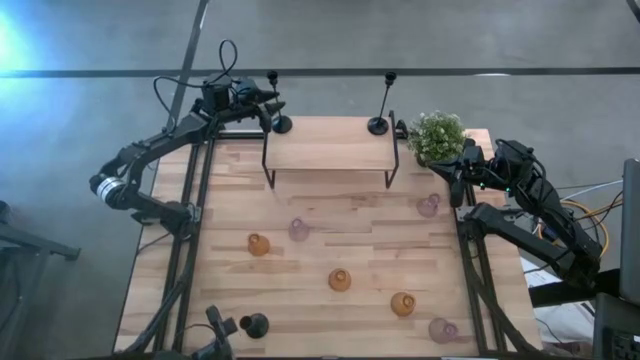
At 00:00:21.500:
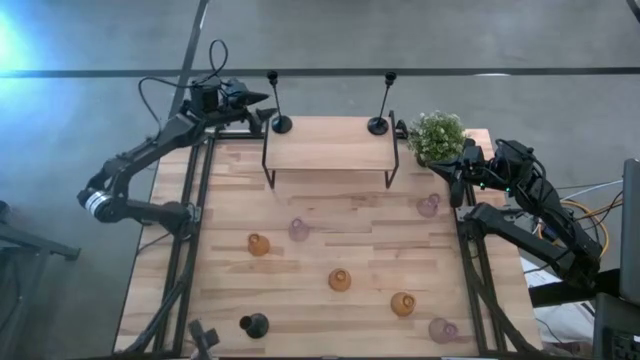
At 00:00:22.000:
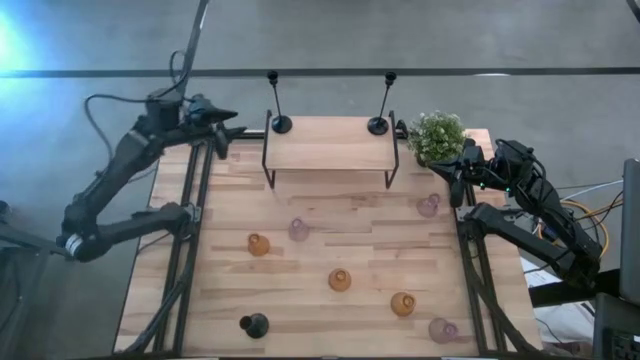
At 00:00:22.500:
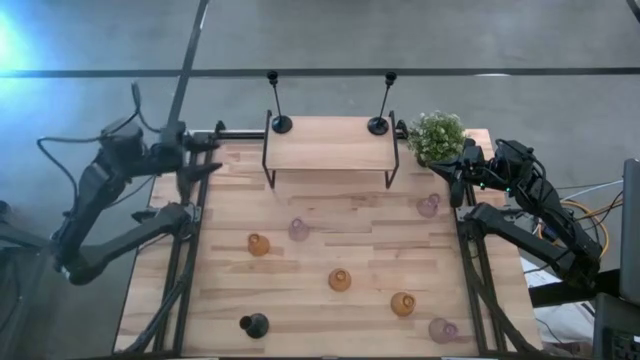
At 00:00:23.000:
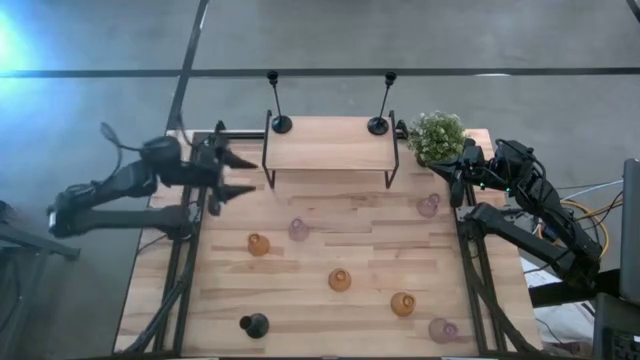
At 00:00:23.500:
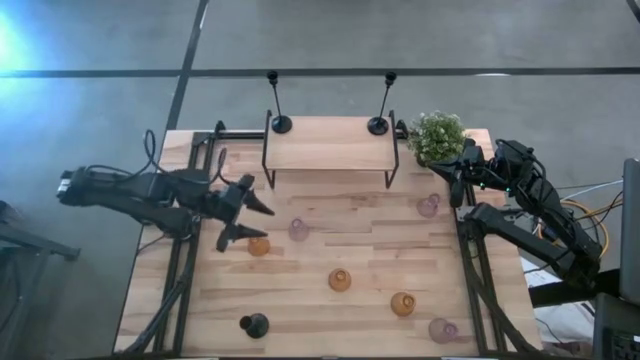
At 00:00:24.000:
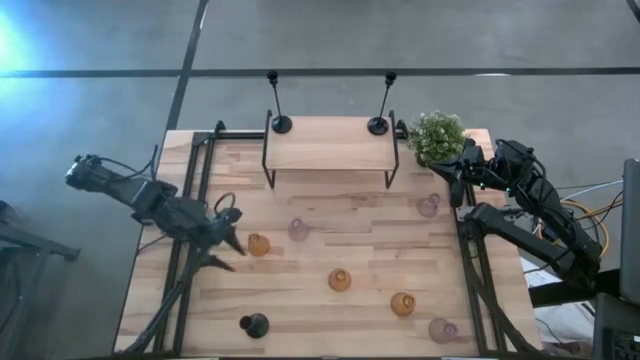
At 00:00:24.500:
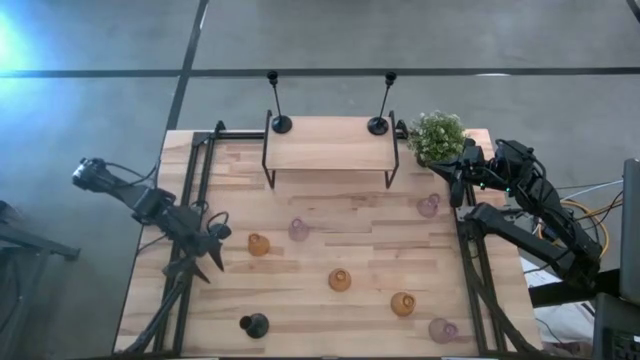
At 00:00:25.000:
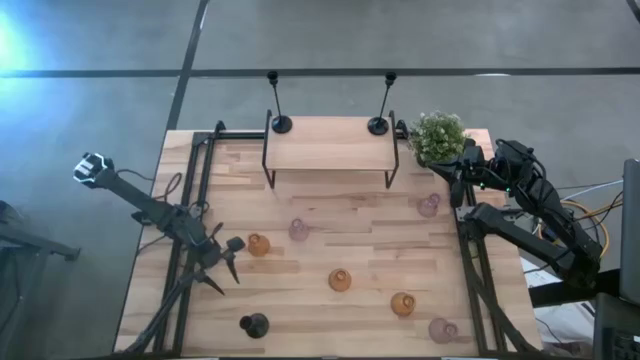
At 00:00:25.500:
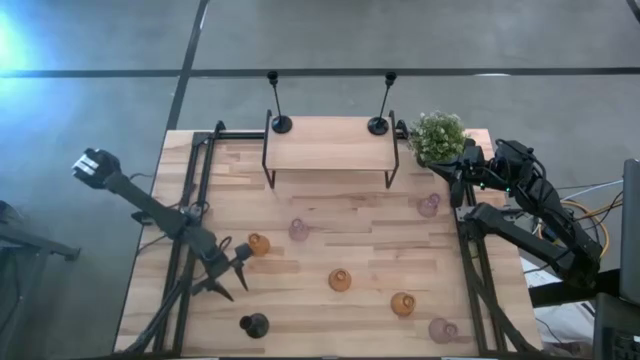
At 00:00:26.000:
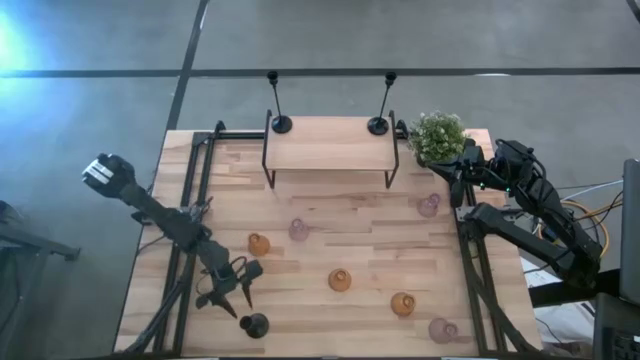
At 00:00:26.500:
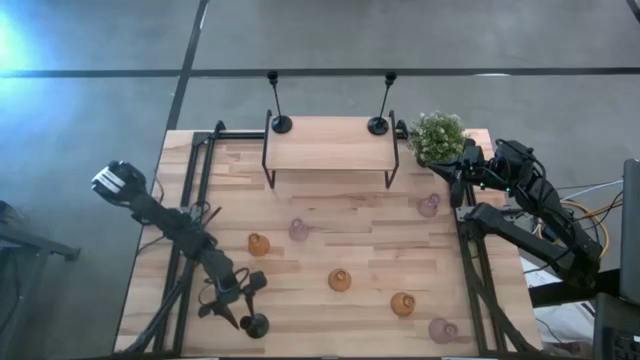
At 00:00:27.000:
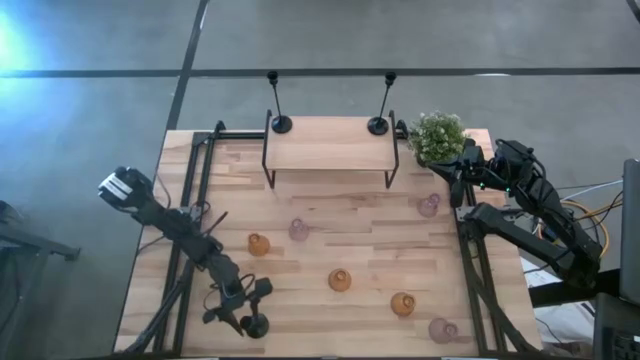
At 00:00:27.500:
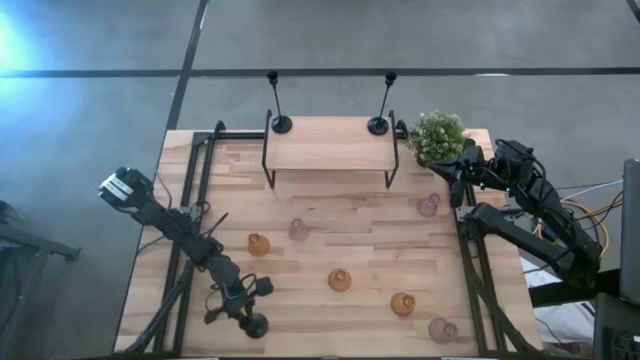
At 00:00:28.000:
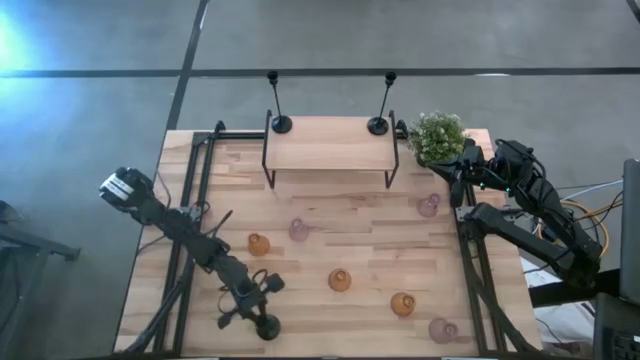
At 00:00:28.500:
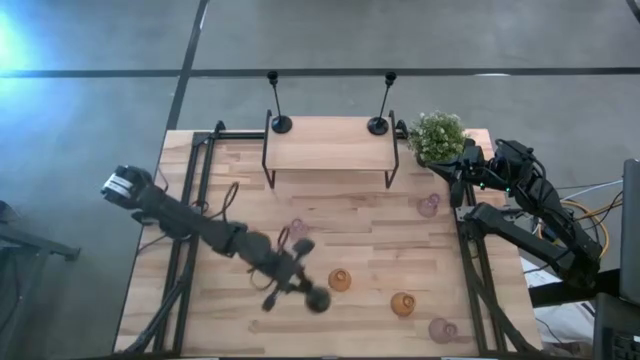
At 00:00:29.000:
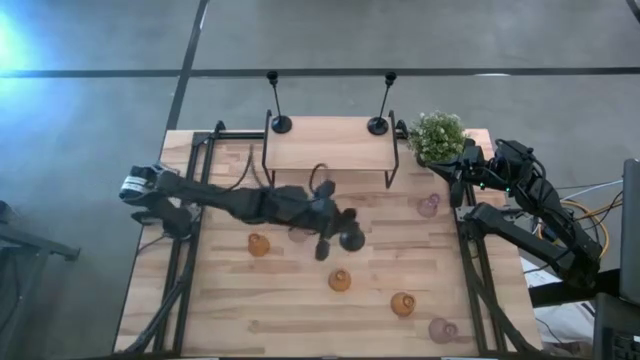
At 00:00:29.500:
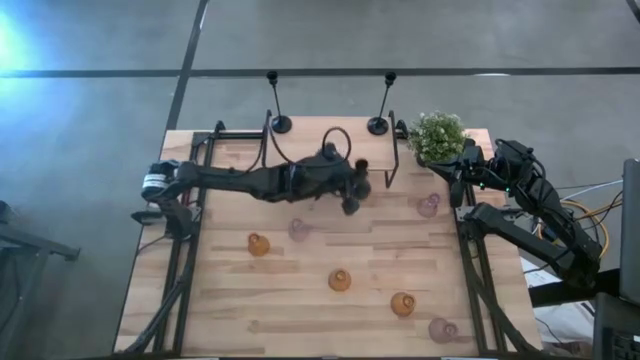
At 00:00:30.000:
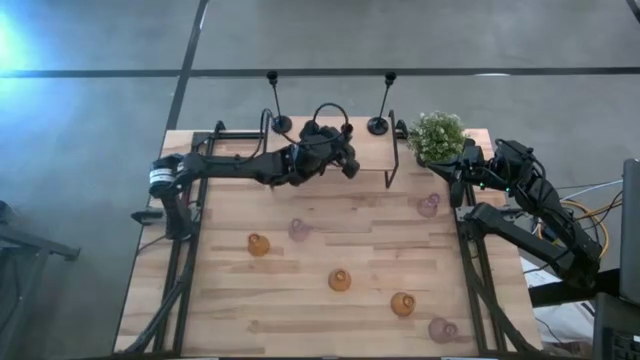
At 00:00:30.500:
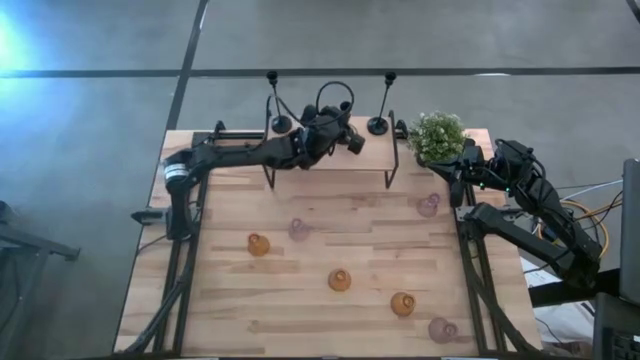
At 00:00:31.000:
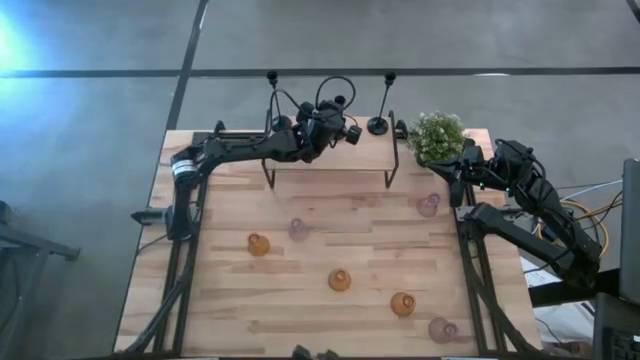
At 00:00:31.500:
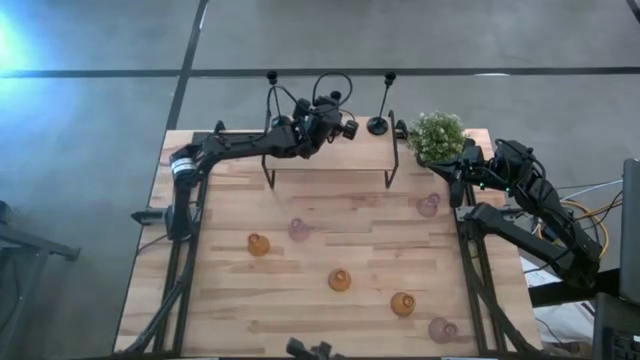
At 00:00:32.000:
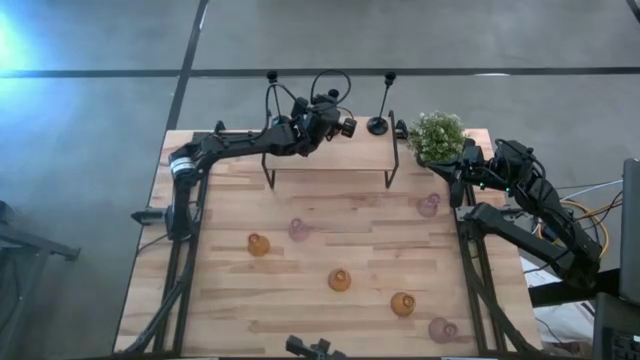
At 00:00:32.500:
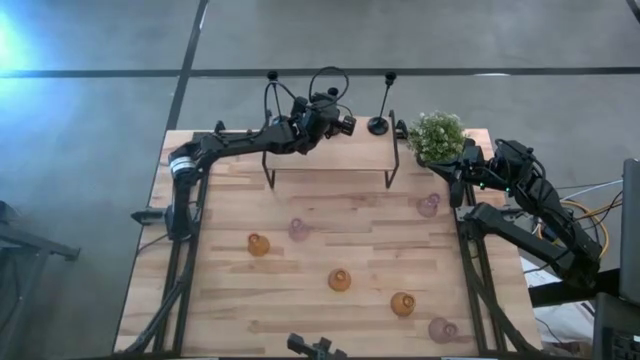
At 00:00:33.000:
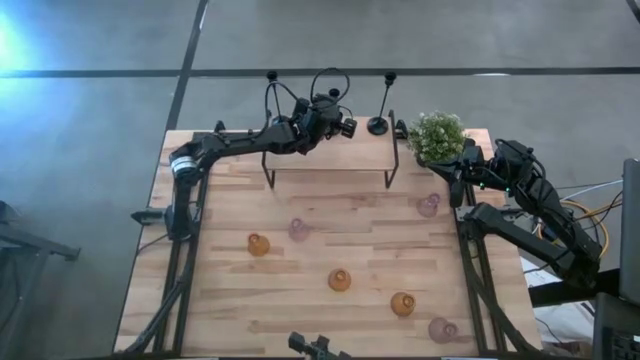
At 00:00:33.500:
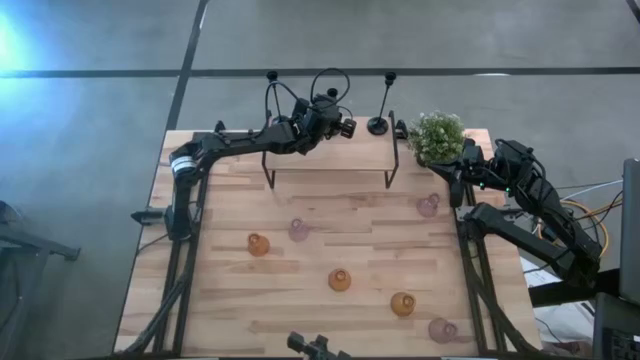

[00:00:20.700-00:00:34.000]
Task: Pick & Place candle stick holders
Put the black candle holder on the shelf

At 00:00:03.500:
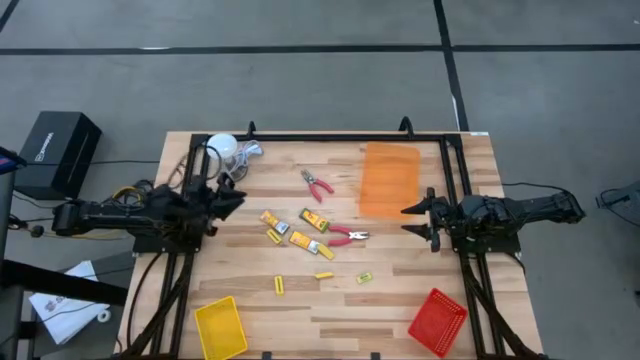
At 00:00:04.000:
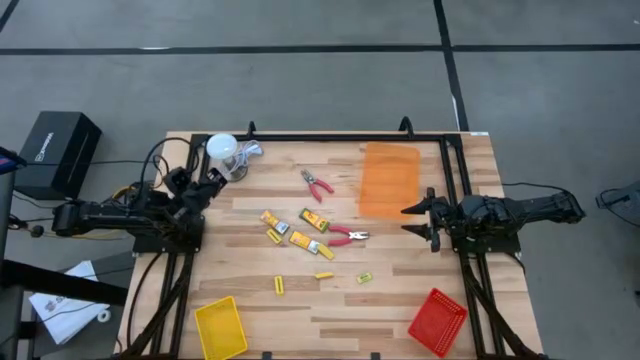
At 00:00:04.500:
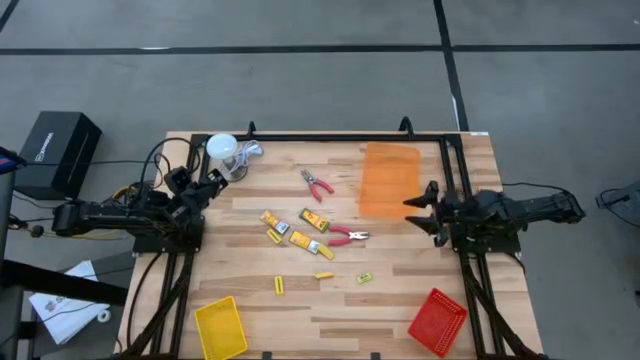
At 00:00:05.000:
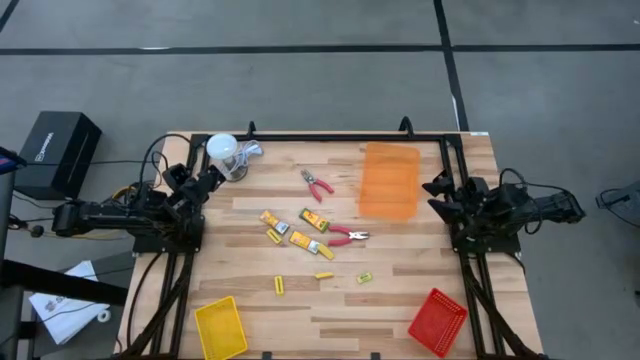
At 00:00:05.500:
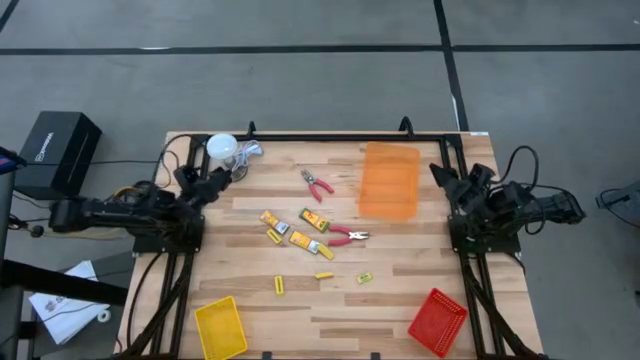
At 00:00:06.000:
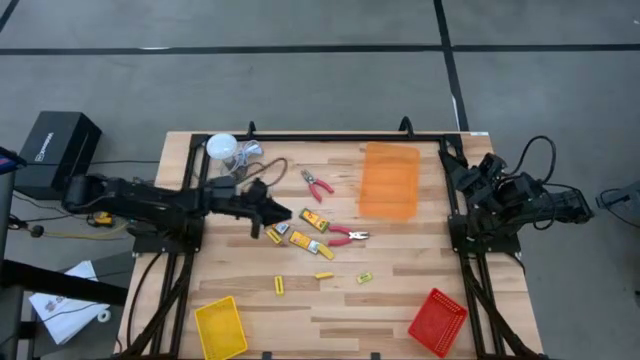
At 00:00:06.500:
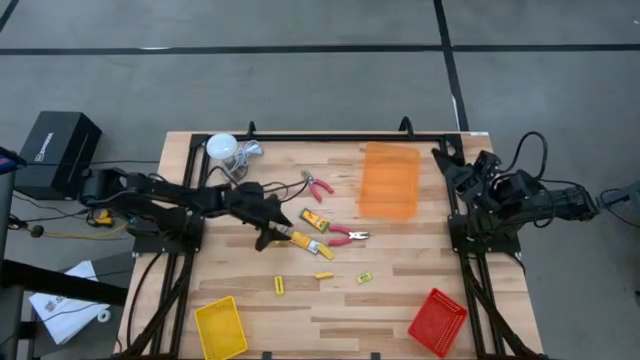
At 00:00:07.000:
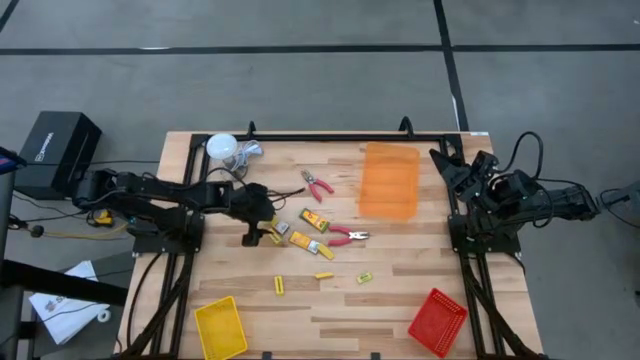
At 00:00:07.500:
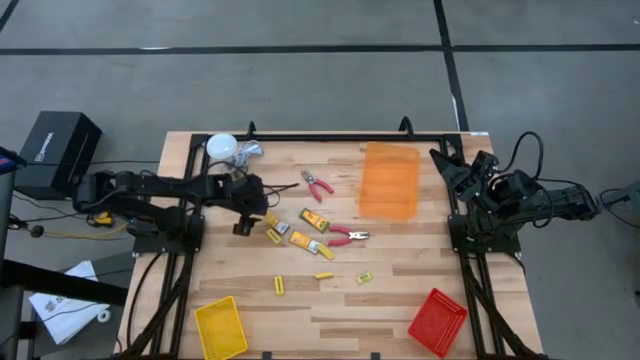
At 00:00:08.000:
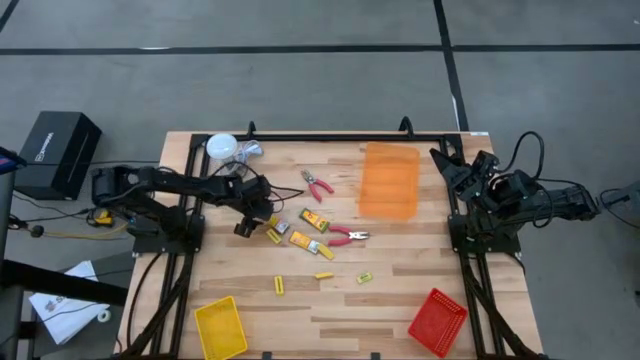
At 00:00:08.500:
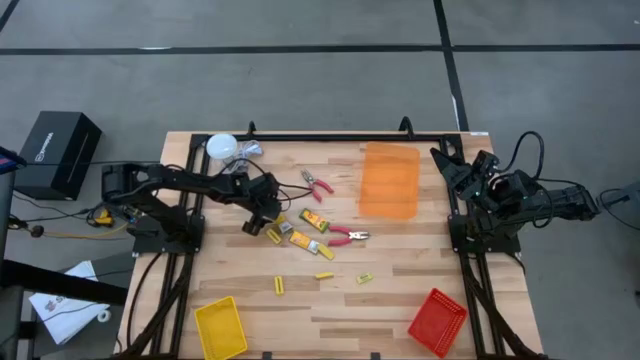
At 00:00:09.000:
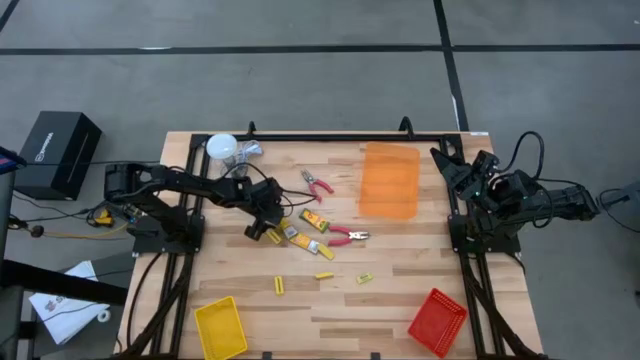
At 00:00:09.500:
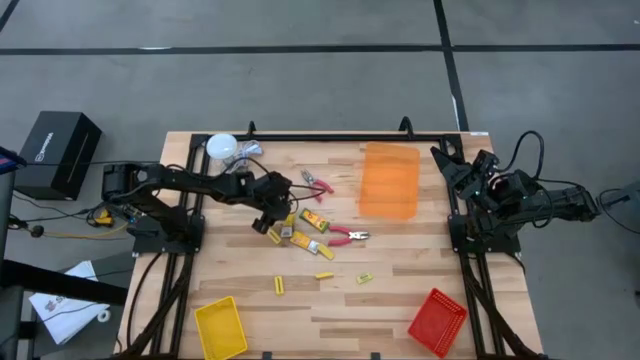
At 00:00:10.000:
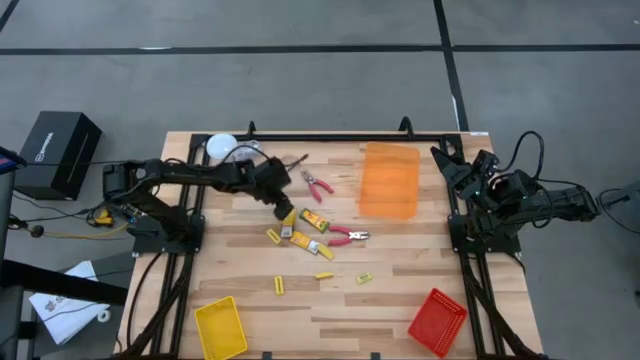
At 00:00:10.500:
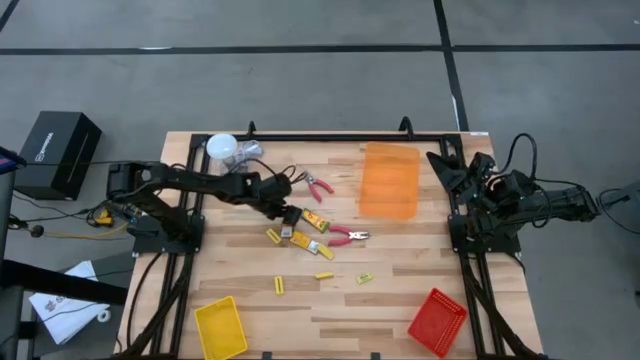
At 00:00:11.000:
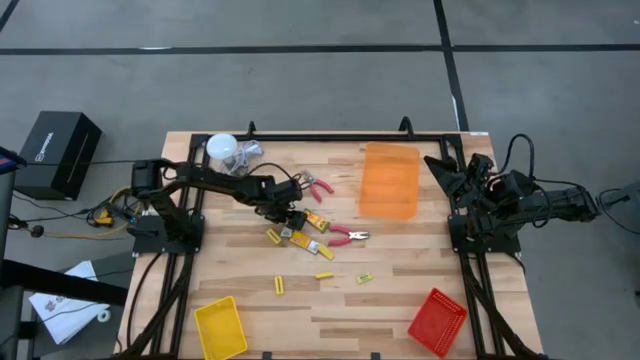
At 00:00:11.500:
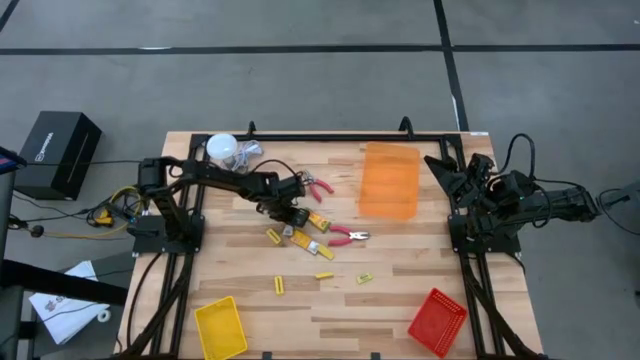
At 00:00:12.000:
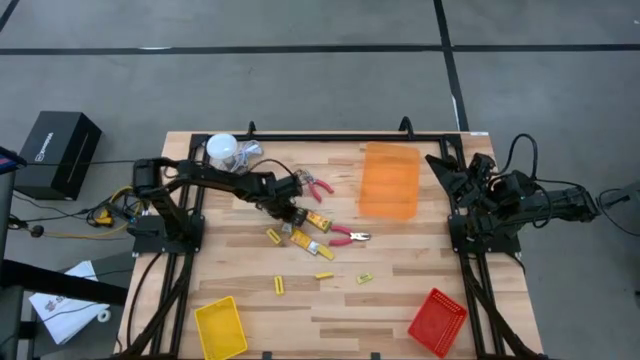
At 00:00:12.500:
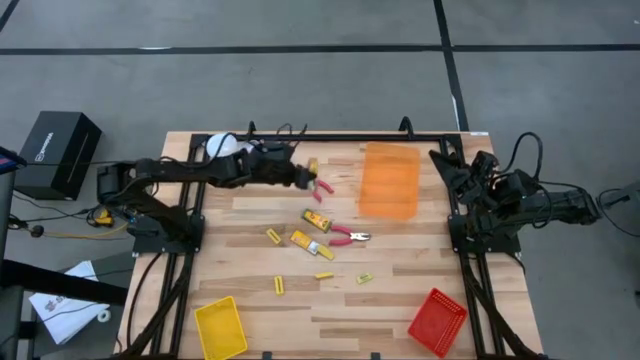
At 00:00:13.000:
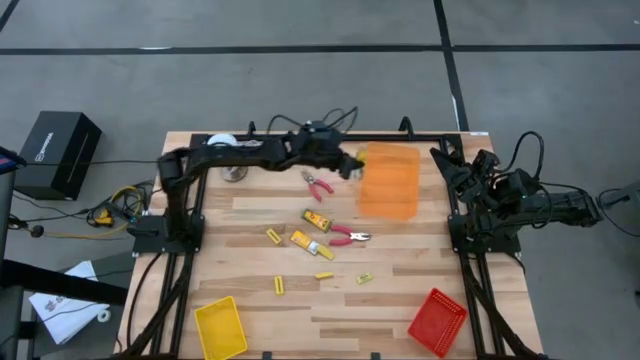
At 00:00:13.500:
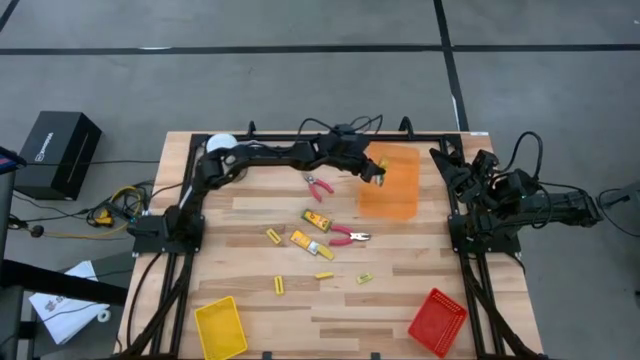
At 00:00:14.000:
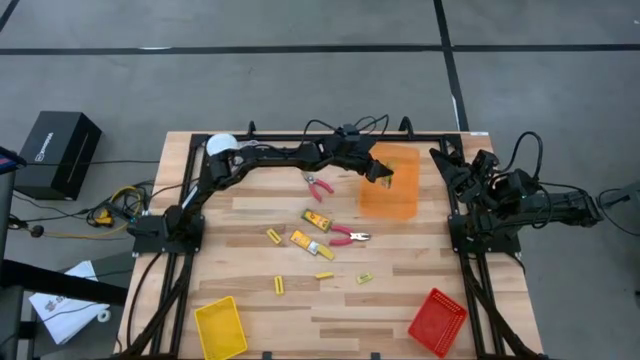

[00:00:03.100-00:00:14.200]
Task: Pick & Place School Supplies
Put the left yellow crayon bag into the orange bin
